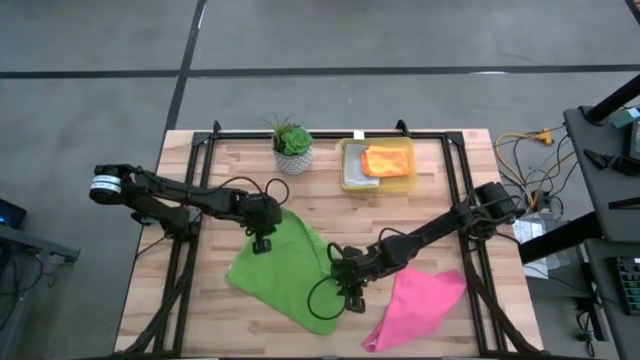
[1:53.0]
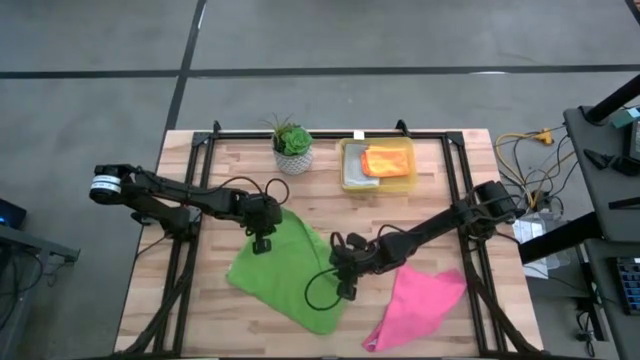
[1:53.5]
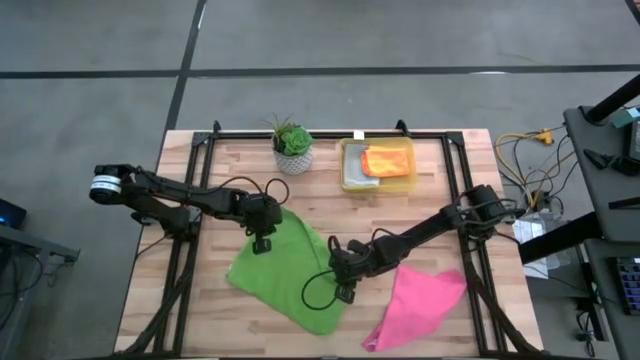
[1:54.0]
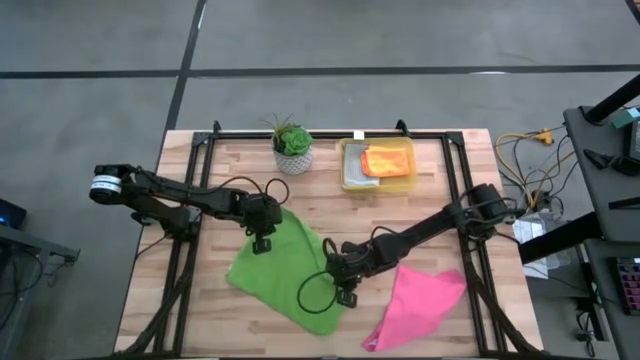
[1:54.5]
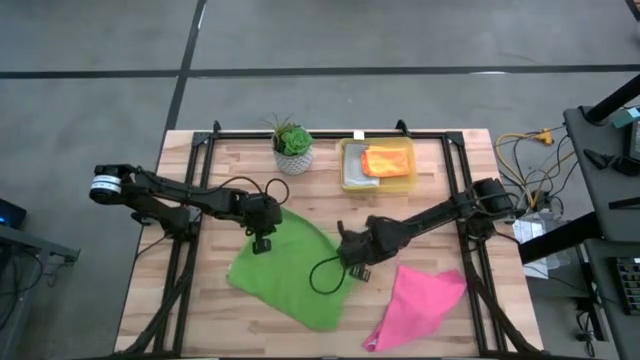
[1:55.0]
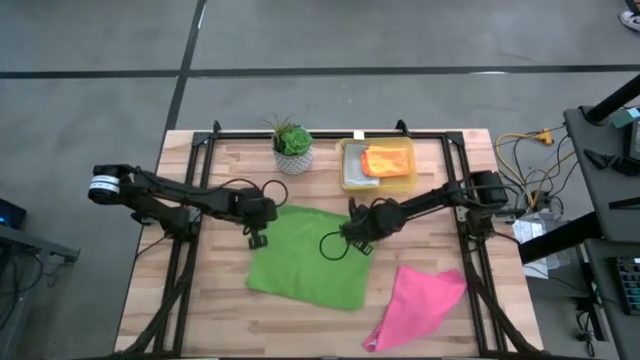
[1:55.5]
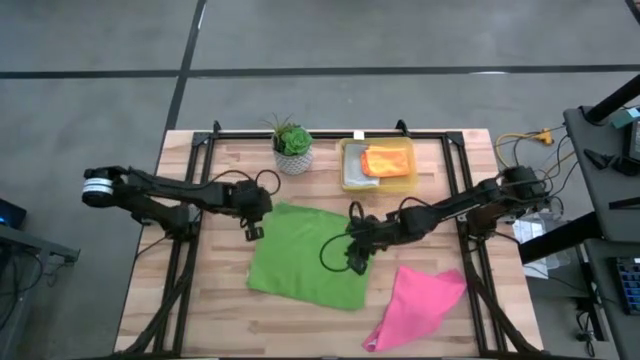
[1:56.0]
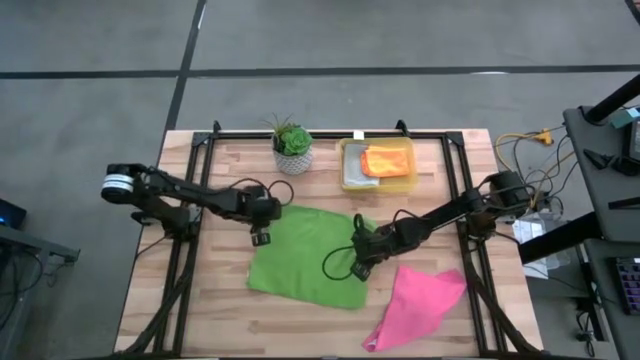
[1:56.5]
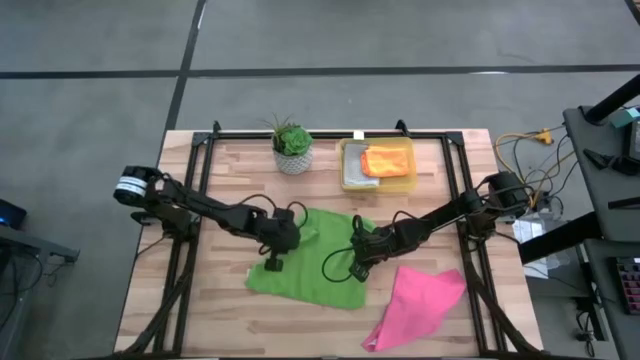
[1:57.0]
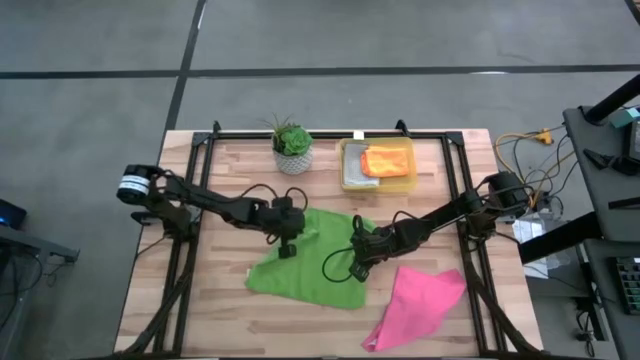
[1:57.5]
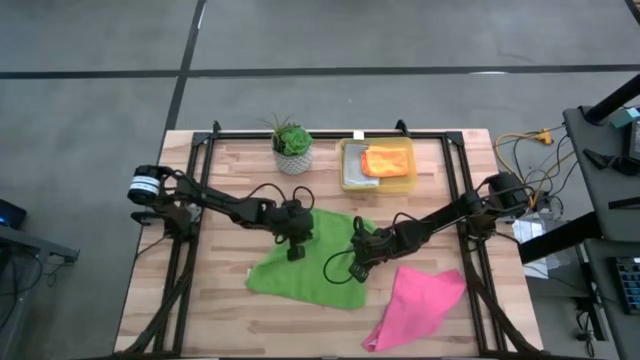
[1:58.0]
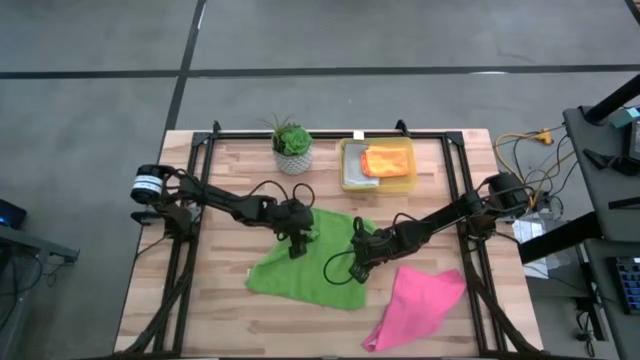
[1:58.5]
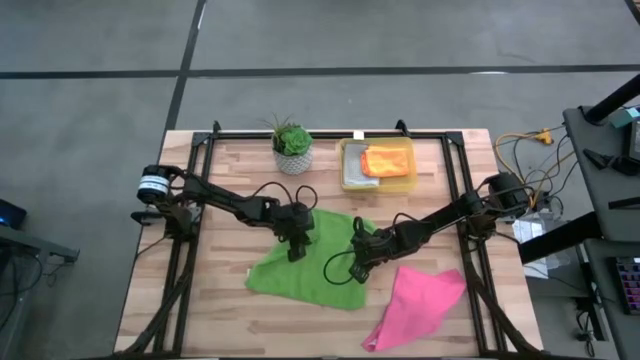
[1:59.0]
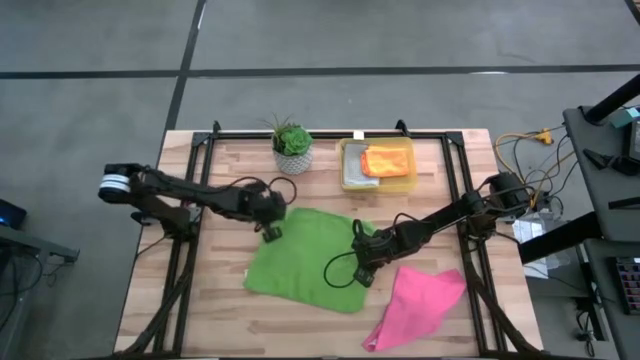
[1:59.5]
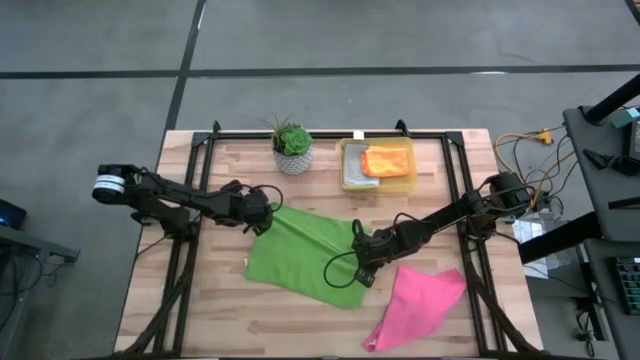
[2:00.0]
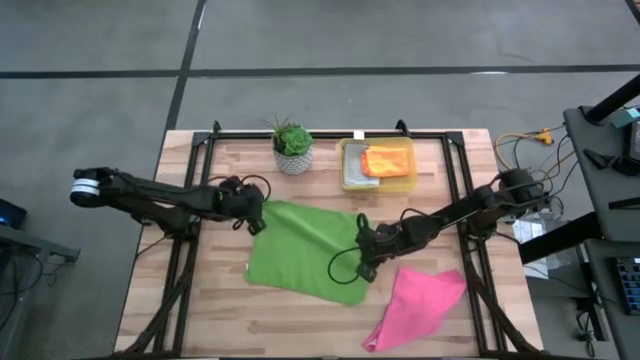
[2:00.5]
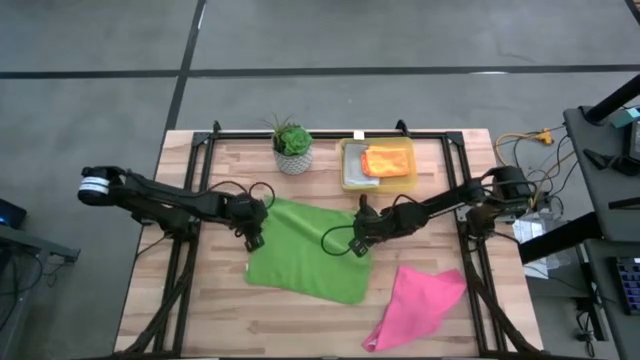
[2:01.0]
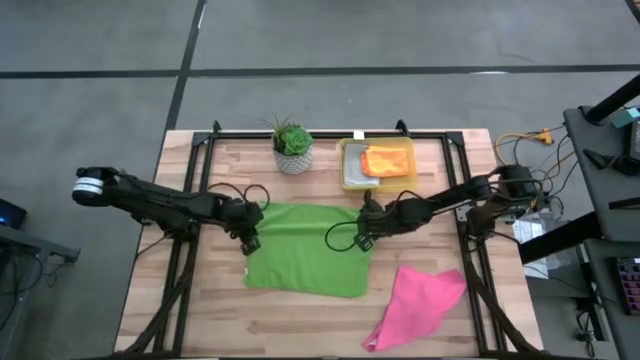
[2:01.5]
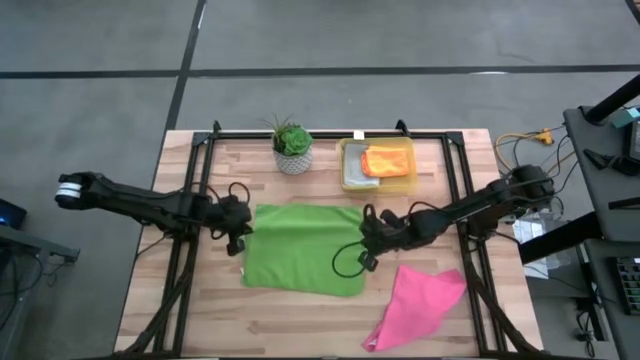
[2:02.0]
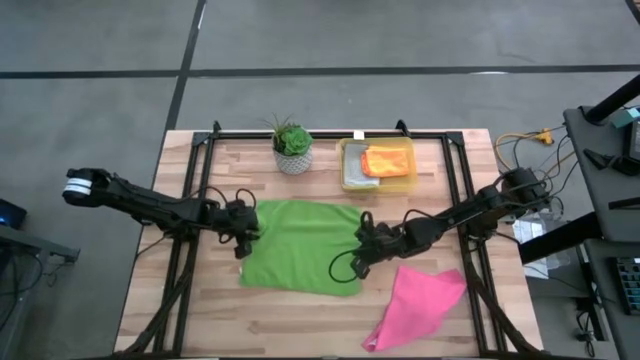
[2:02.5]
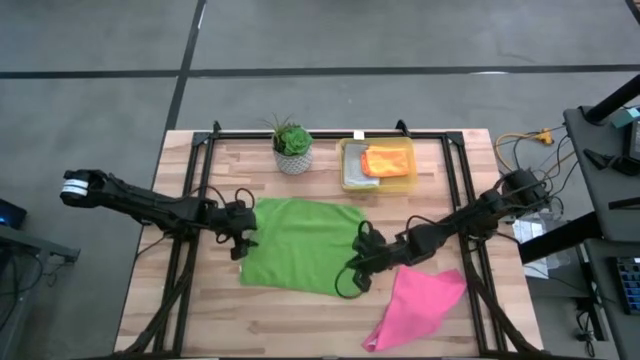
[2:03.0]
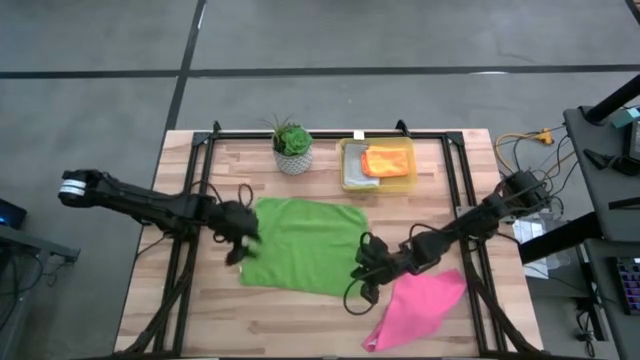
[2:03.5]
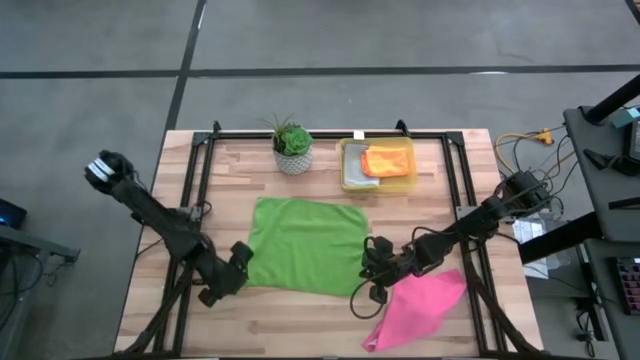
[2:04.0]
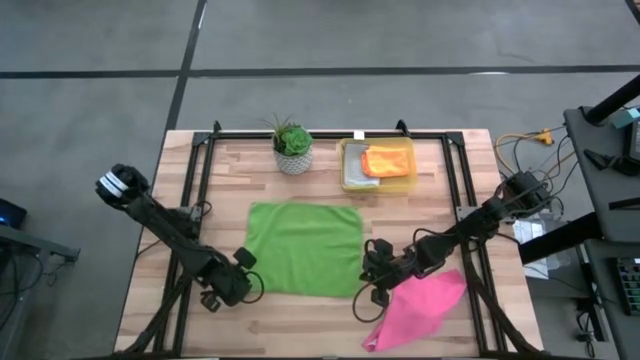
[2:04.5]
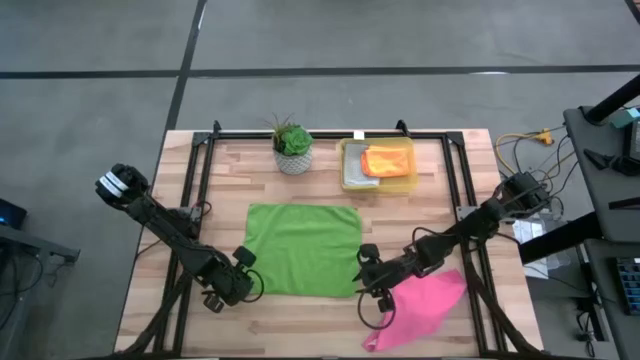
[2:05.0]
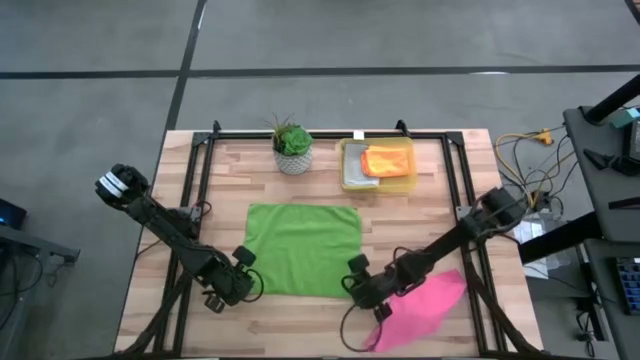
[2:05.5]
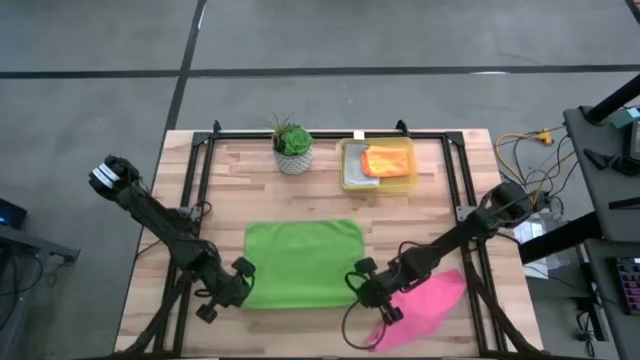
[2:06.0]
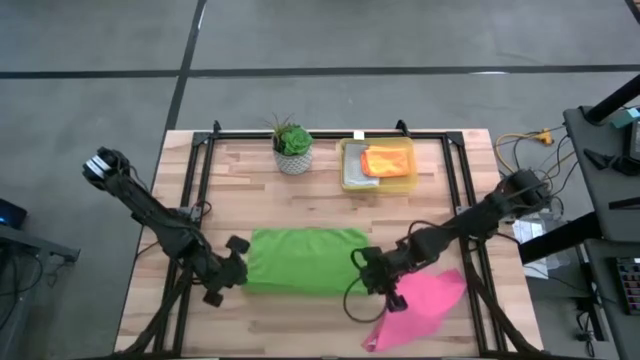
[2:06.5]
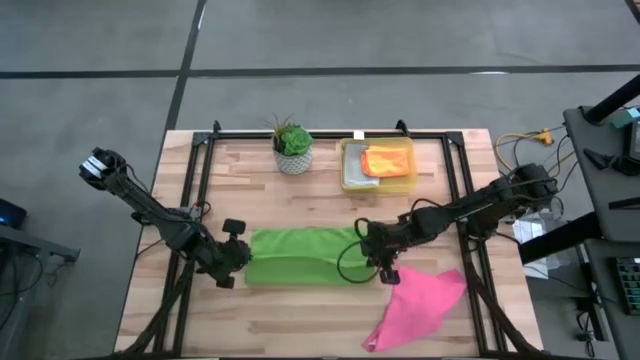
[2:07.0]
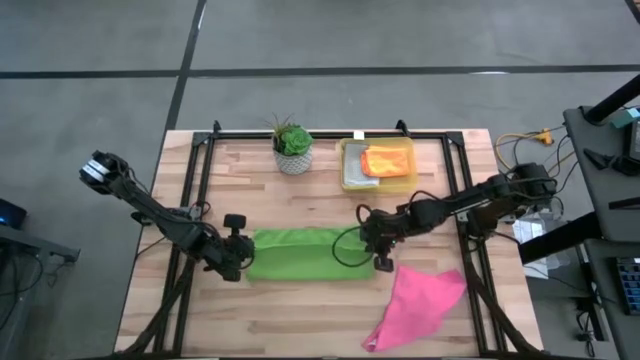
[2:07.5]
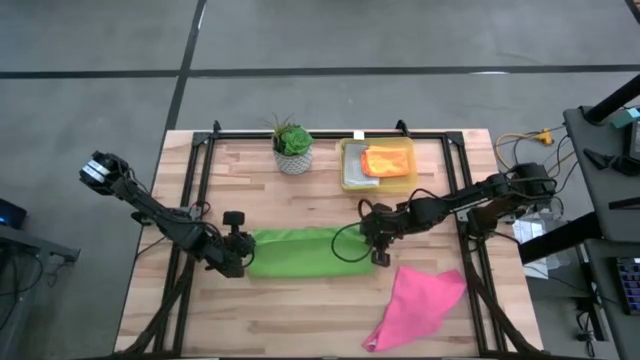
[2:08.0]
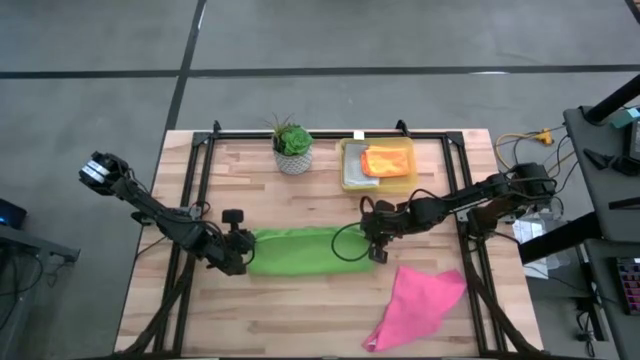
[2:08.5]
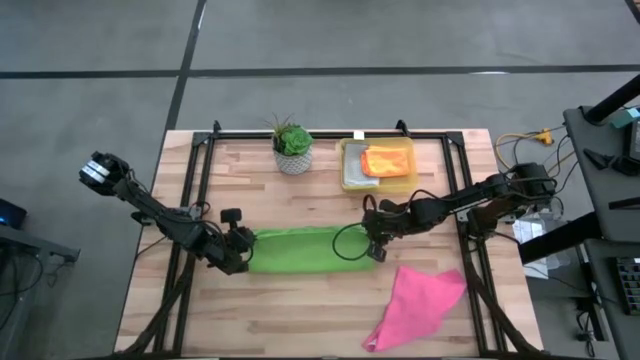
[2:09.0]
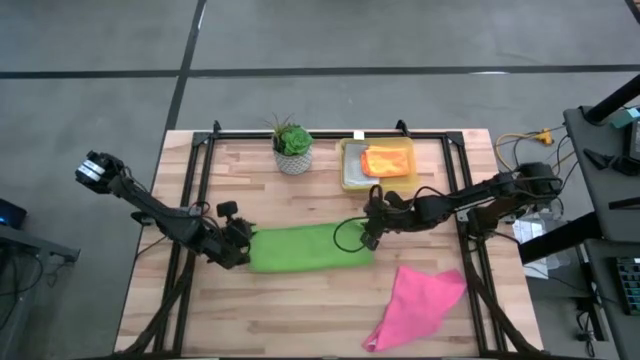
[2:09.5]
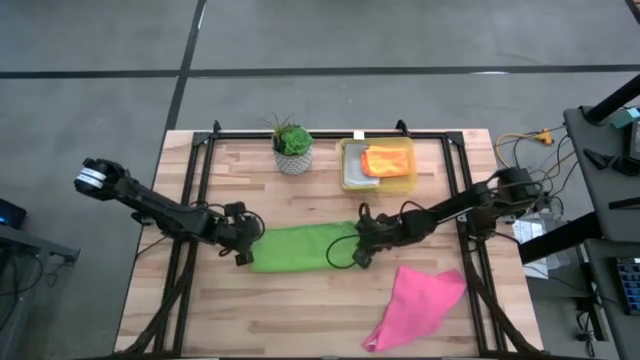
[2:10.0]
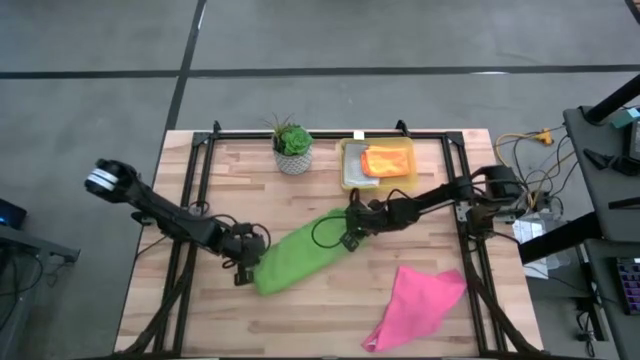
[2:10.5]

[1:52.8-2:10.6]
Task: Fold microfiber towels
Fold the green microfiber cloth

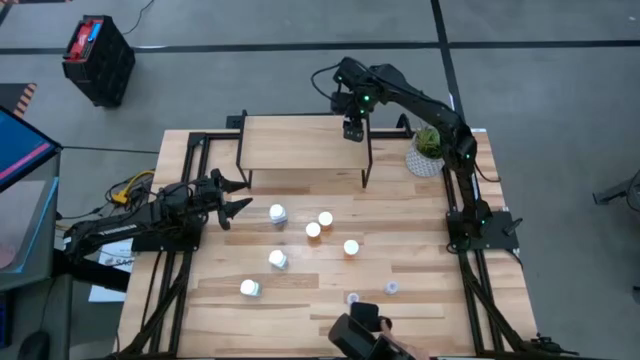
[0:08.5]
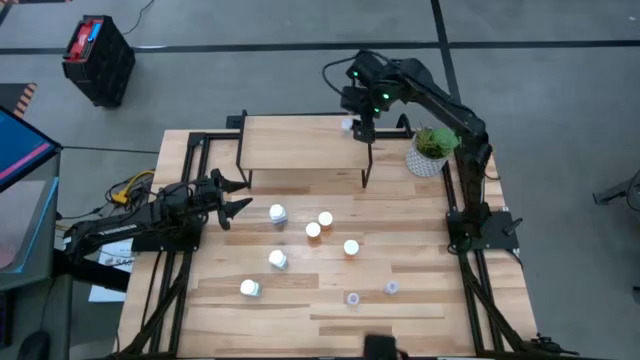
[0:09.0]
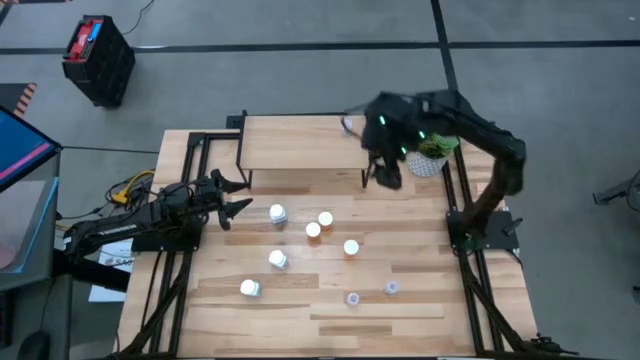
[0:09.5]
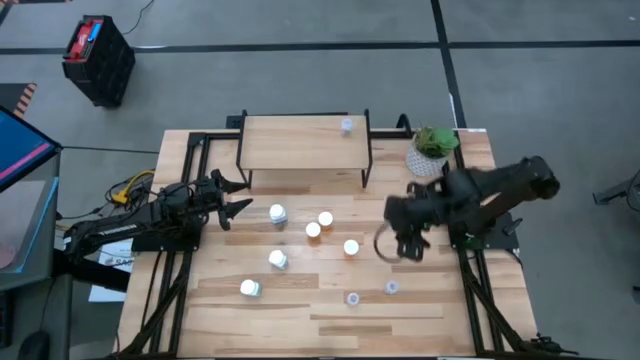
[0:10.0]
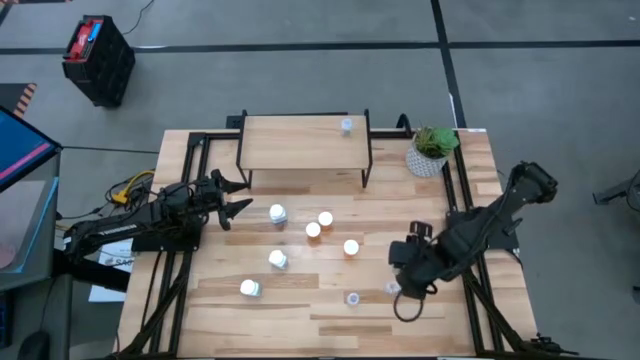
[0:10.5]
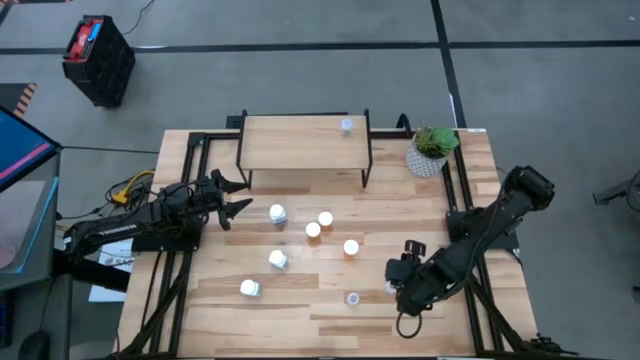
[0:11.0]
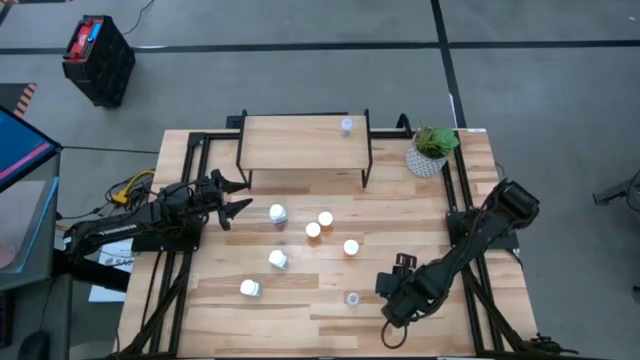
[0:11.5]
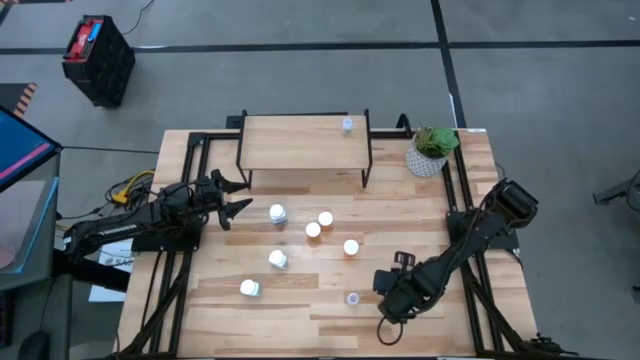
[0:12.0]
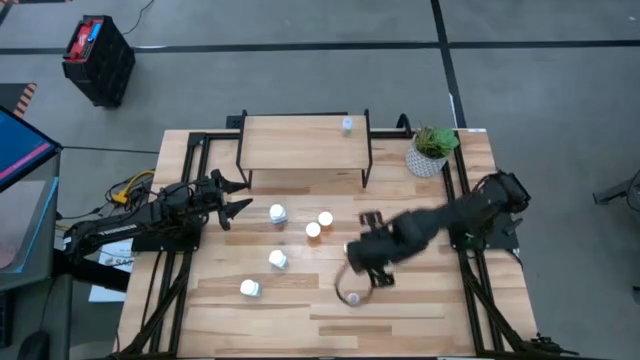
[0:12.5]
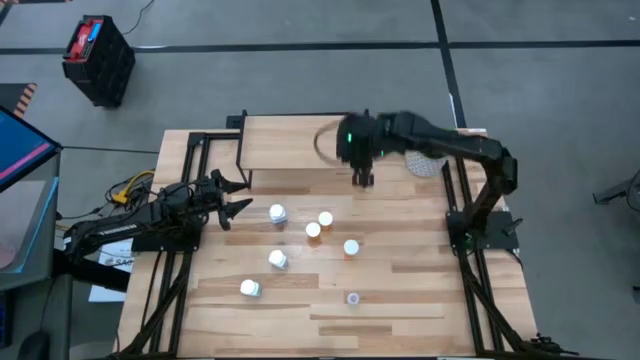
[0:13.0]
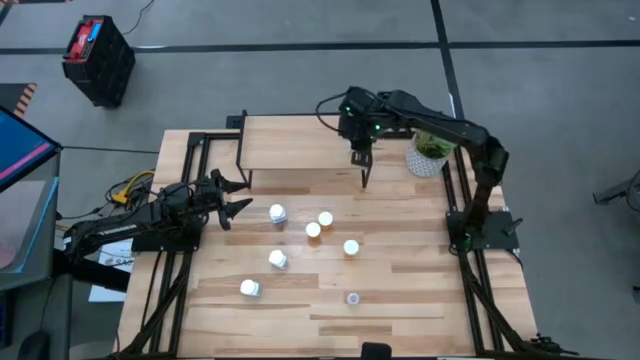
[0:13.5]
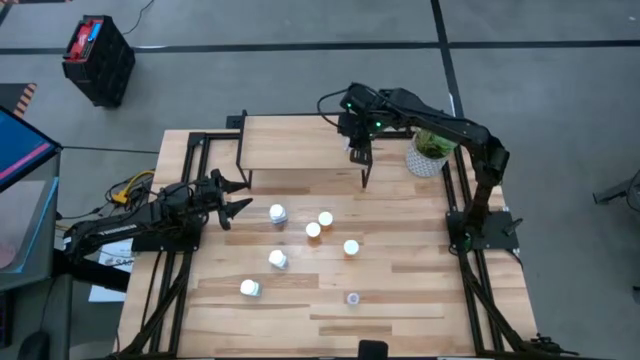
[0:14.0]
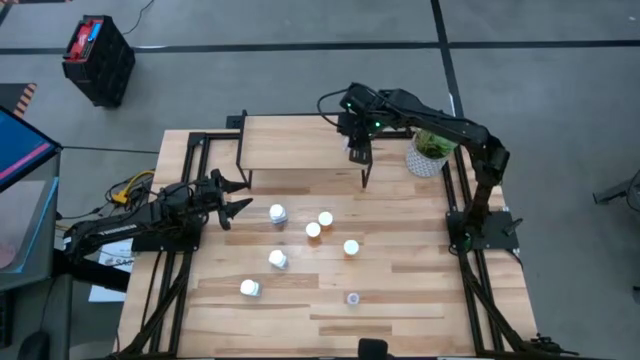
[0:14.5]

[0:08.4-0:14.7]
Task: Pick and place medicine bottles onto shelf by color
Put the right transparent pill bottle on the shelf aligned with the other transparent pill bottle
